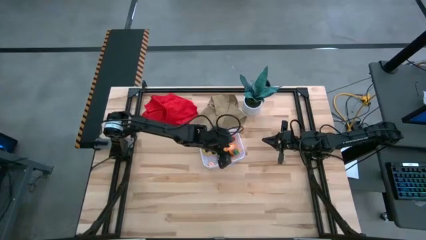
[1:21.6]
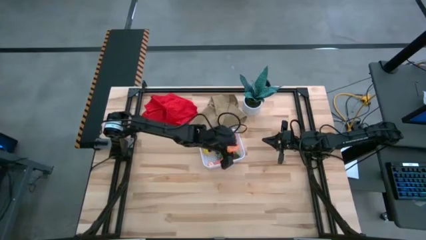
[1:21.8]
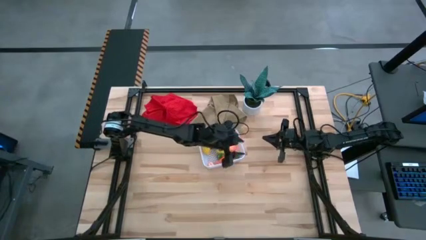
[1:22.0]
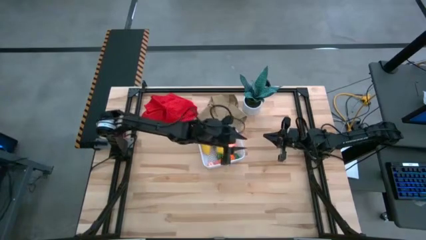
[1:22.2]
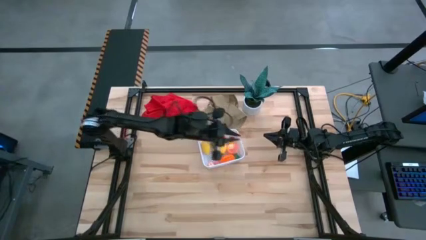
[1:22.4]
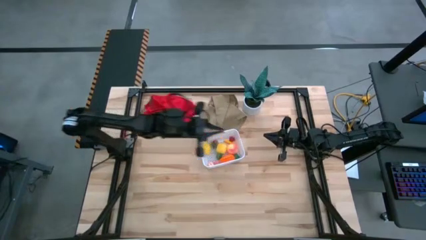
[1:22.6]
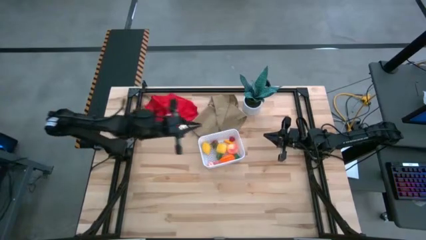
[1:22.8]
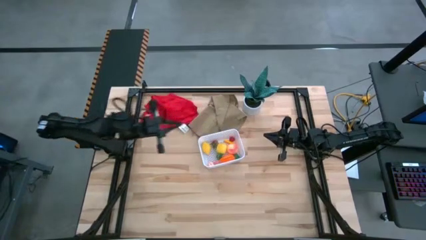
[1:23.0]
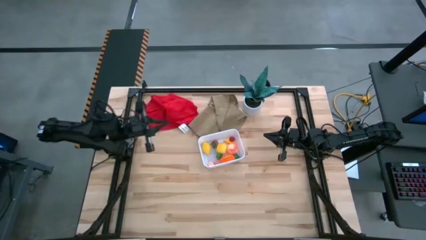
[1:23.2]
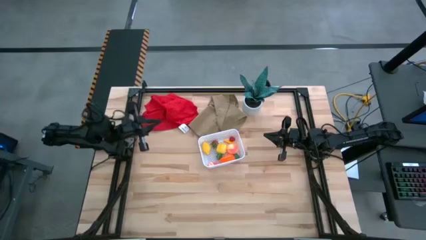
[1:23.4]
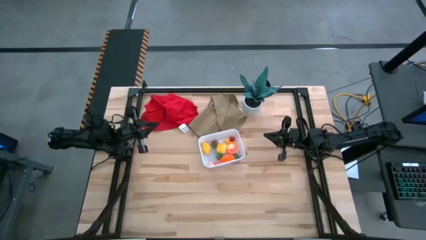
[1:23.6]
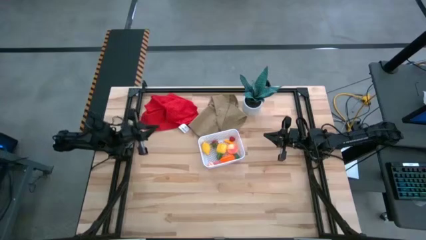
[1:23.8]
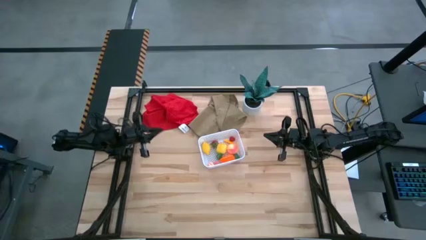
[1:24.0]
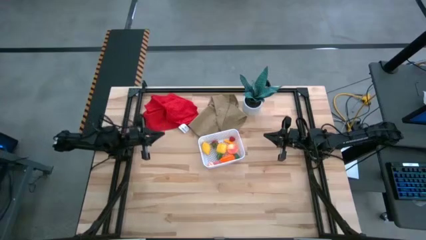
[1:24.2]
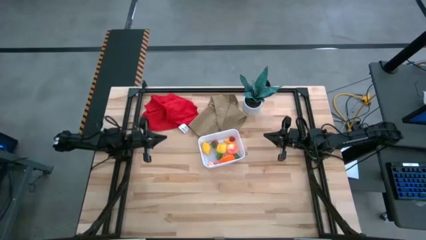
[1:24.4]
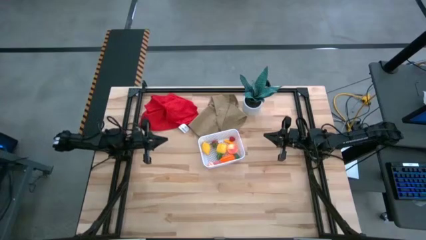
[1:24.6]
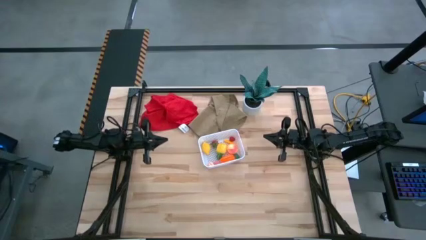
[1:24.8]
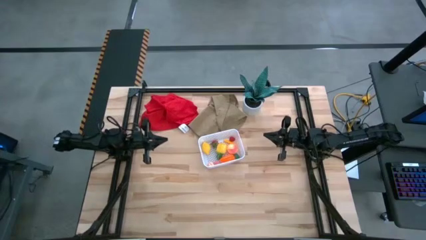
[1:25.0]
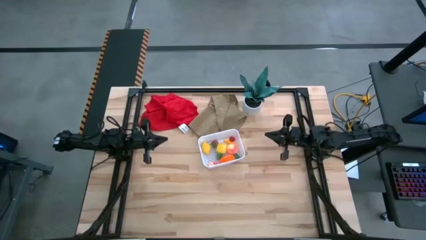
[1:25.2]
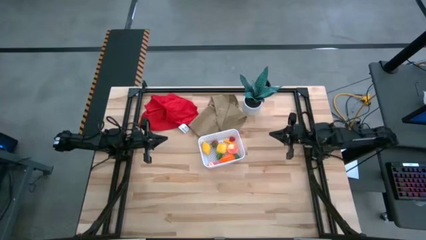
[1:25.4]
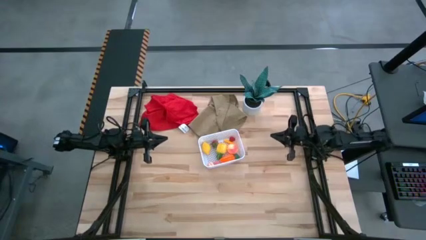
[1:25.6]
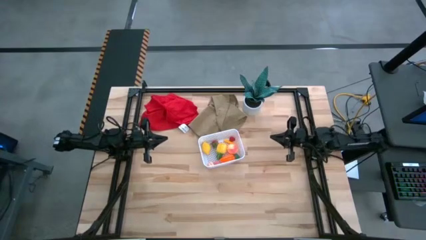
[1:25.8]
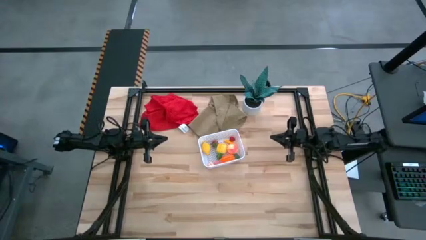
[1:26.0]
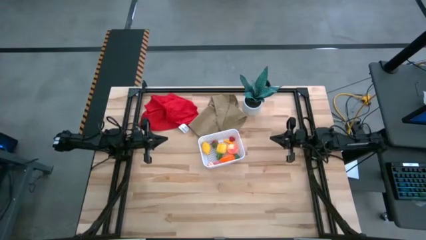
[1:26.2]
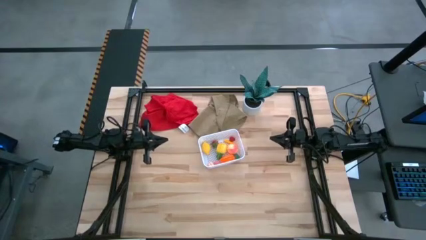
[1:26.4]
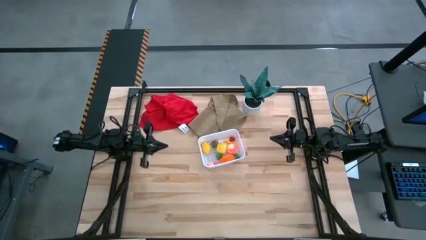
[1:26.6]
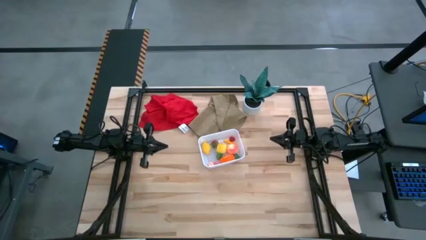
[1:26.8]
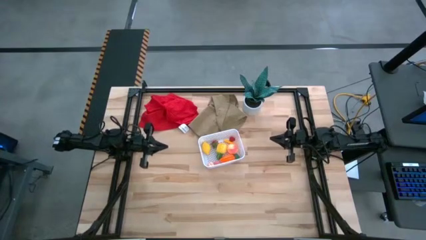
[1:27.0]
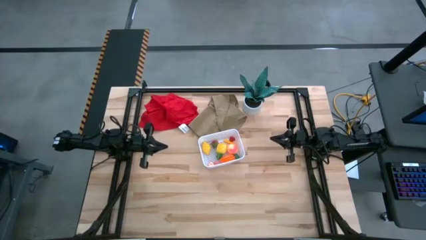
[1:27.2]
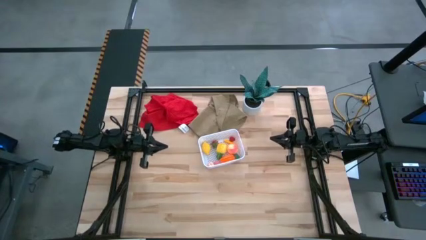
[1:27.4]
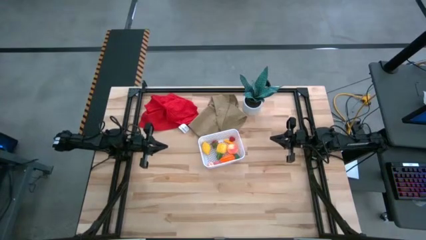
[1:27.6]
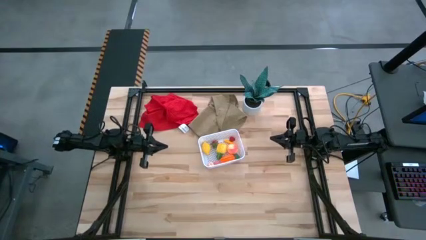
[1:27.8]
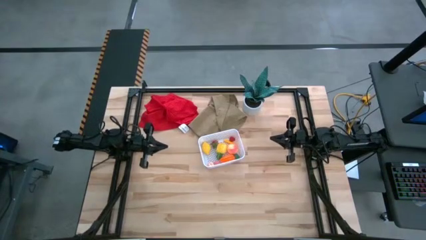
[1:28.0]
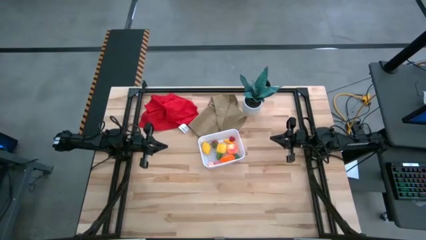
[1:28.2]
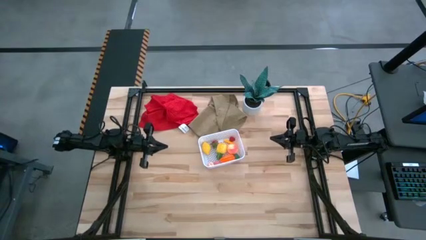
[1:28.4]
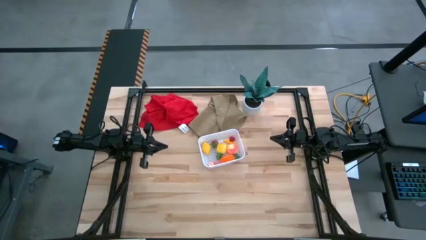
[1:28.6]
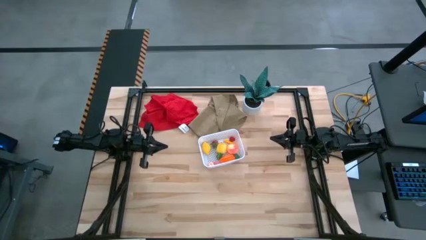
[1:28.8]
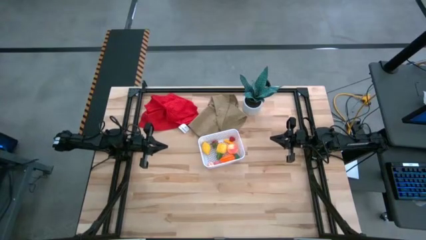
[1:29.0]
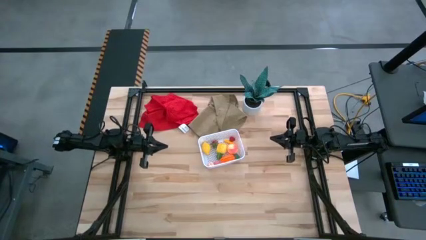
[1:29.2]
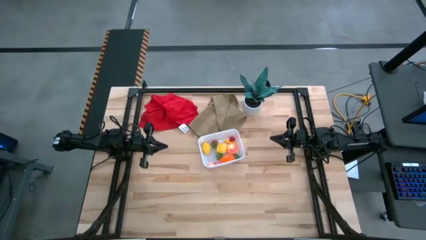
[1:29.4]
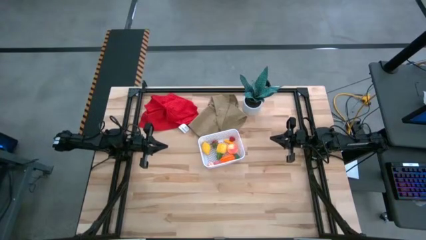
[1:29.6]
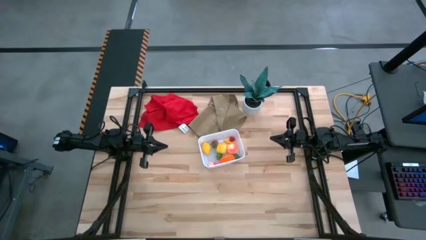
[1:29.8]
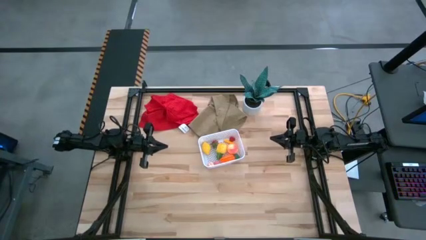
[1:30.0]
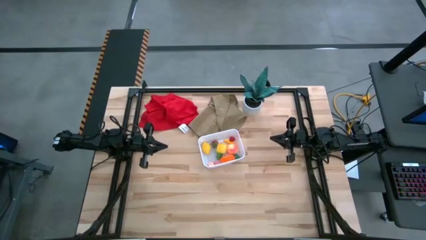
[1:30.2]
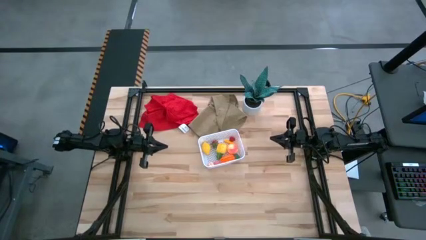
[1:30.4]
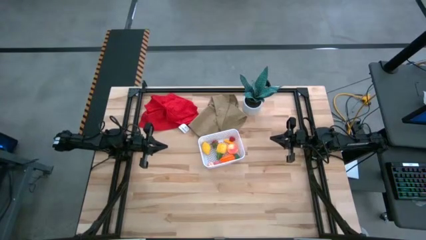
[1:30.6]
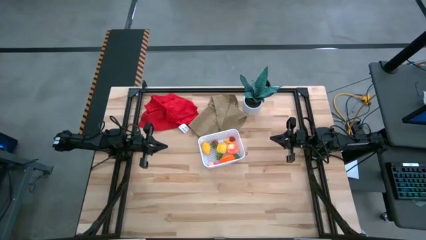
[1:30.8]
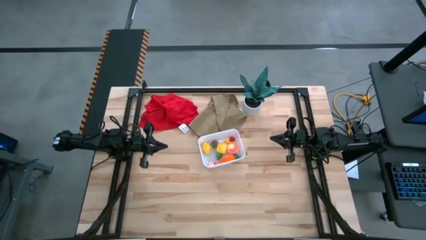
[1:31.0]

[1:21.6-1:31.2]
Task: Pick and placing Produce into tupperware
Return to Home Position

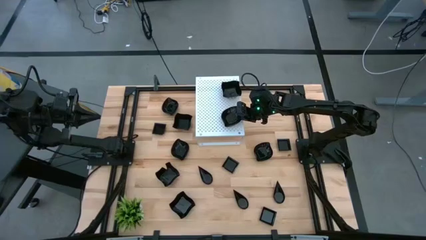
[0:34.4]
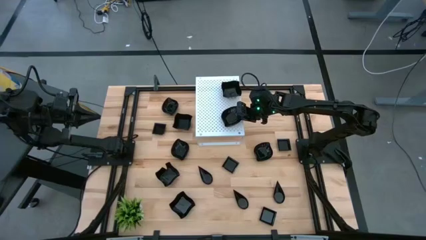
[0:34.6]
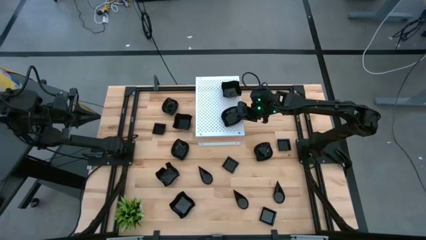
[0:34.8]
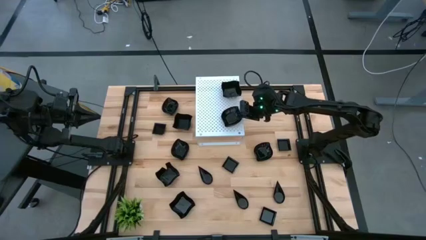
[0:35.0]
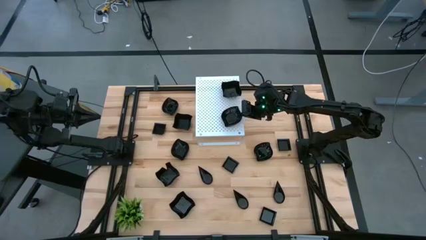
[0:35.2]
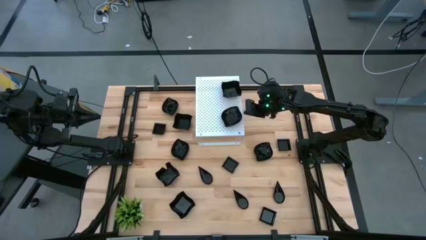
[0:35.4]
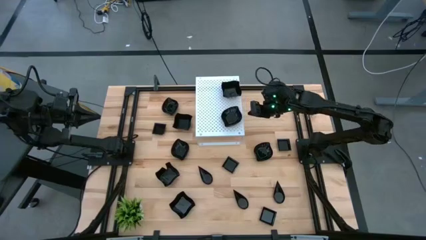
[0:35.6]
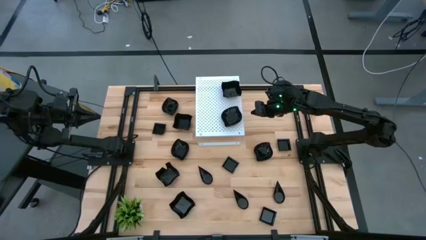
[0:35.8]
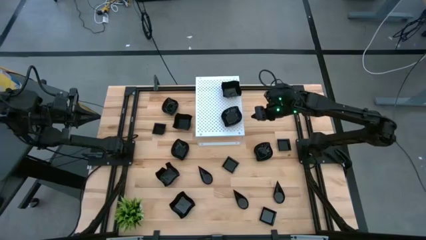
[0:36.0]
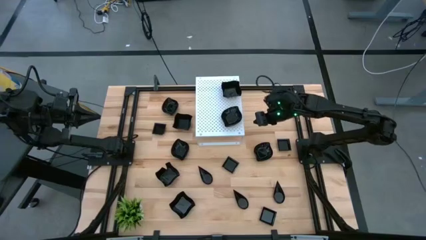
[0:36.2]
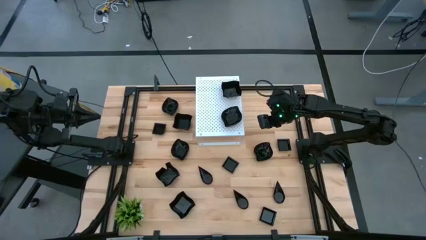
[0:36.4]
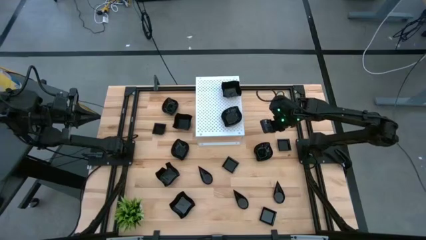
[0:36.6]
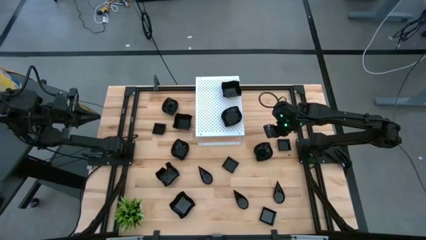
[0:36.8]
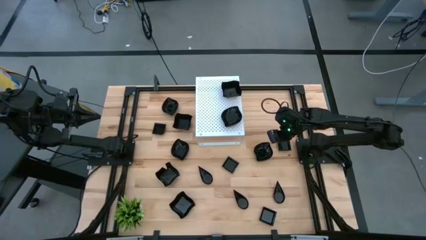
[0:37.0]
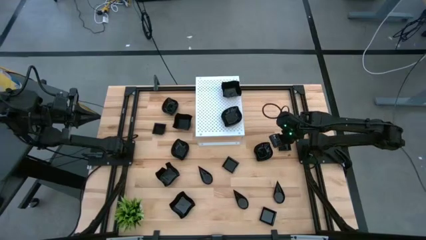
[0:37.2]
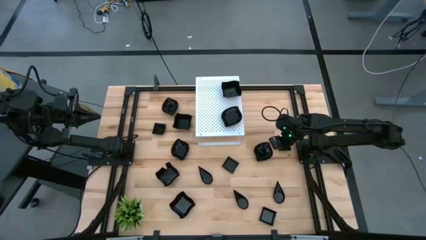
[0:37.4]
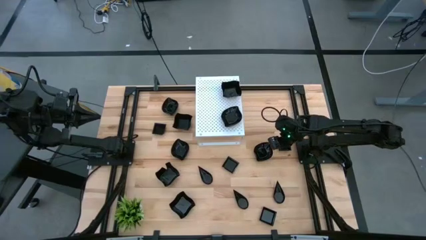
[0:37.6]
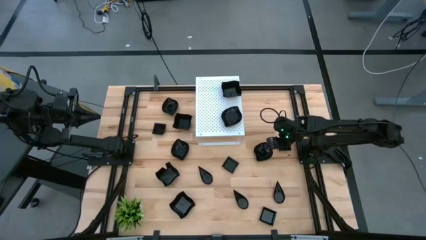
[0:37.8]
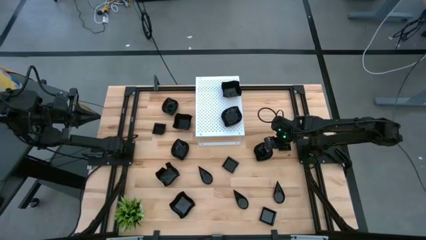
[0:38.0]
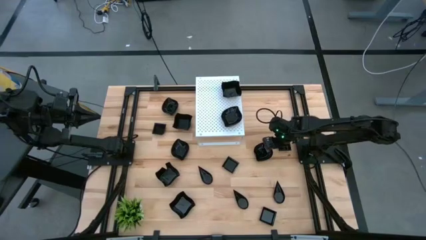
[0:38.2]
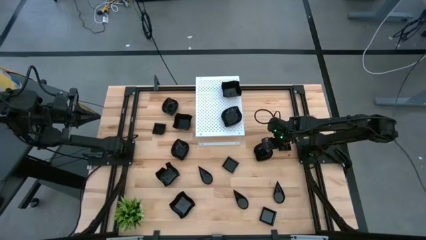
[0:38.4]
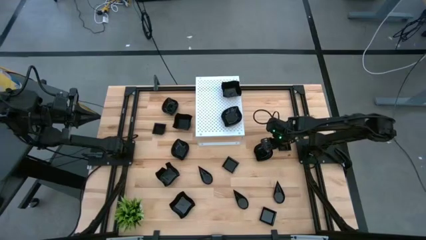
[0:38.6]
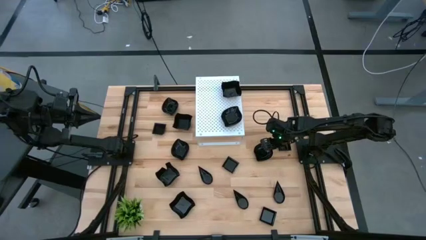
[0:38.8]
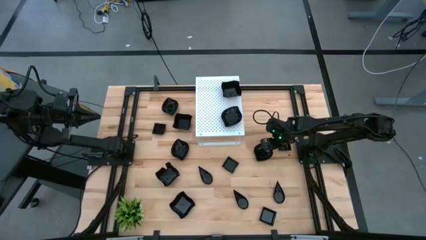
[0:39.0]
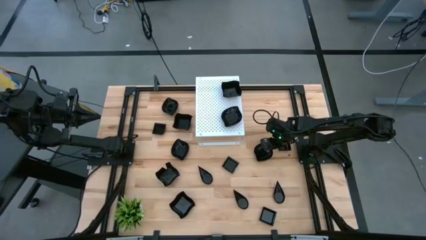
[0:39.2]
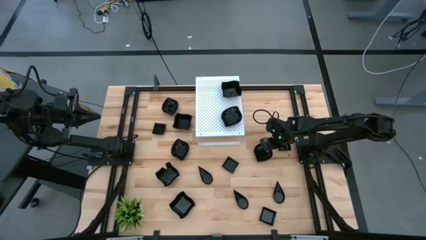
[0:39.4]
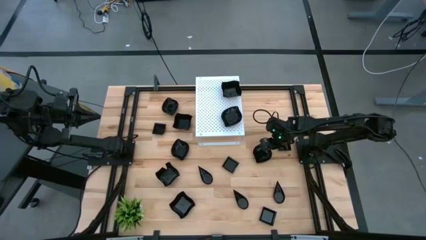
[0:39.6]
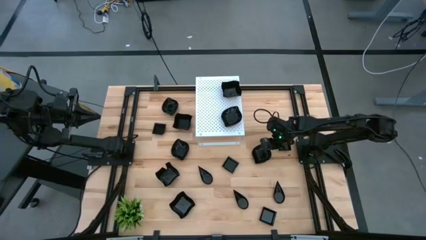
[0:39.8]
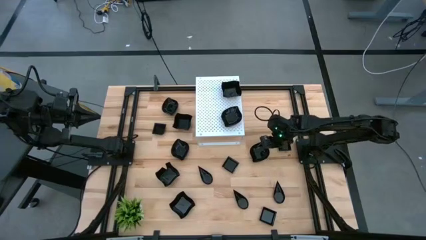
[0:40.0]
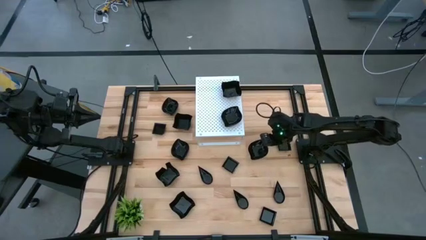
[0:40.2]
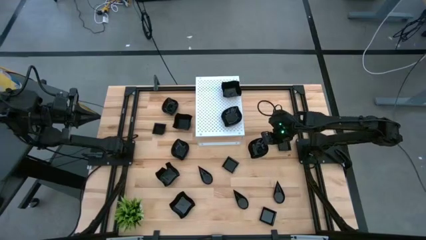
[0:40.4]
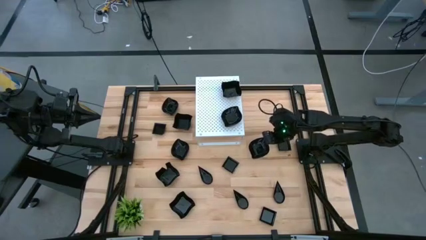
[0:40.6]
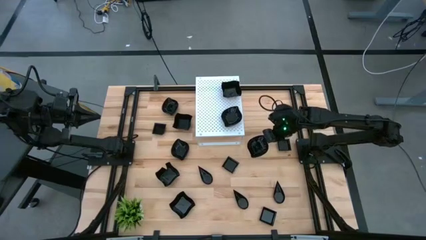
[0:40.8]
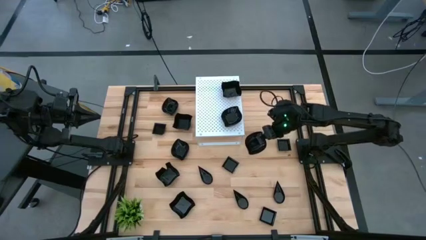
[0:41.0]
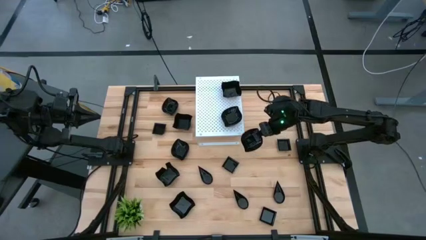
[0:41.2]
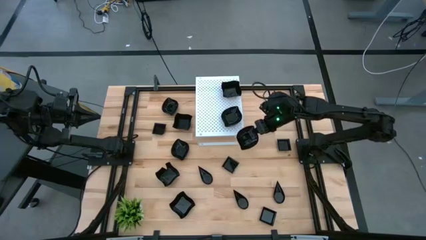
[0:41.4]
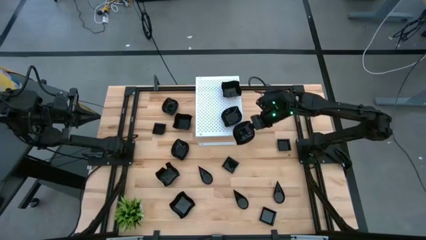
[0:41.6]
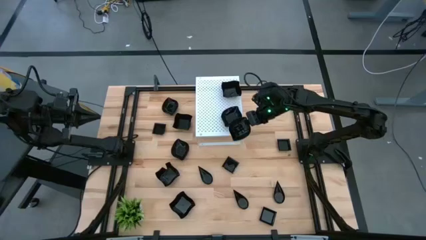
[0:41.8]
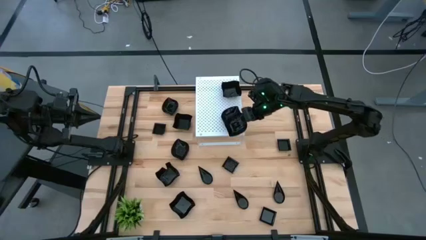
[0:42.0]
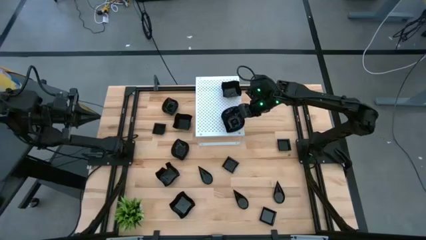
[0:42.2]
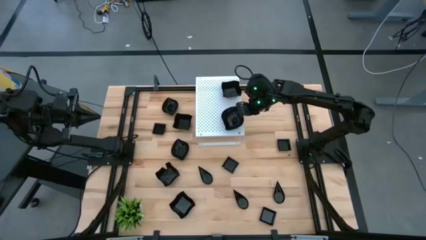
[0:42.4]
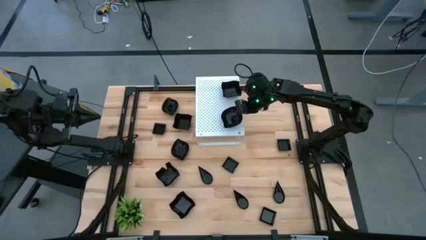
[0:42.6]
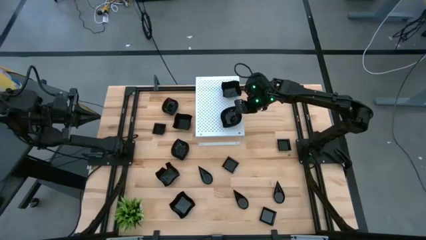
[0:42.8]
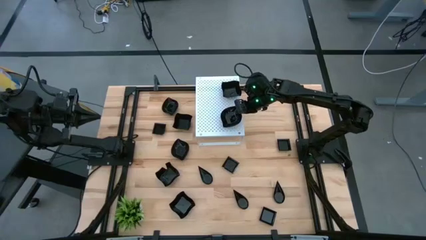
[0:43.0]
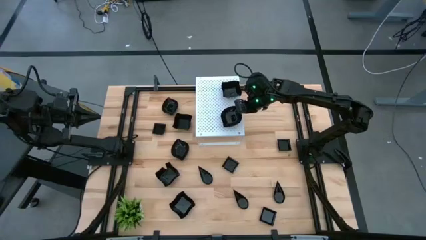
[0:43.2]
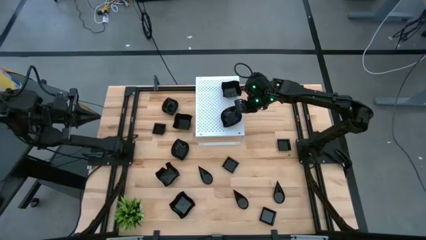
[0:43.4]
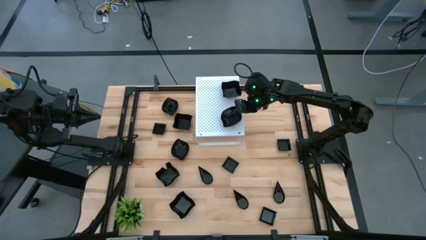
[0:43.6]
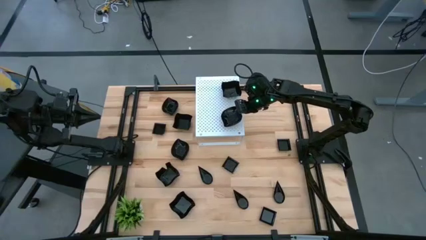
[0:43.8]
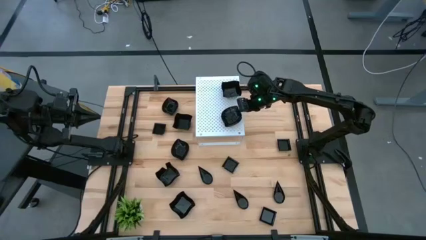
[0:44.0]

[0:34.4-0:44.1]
Task: Pick & Place Mini shaped plates
Stack the leaf-shaped plate on top of the leaf-shaped plate on the shelf
